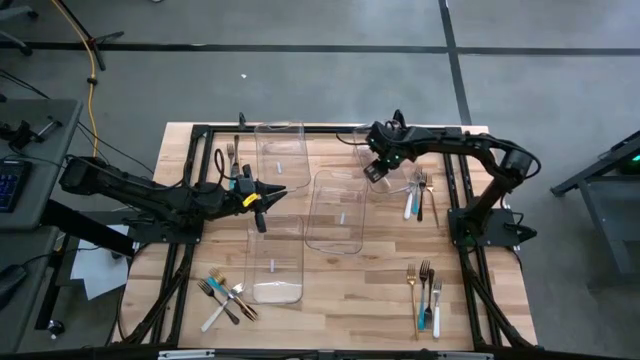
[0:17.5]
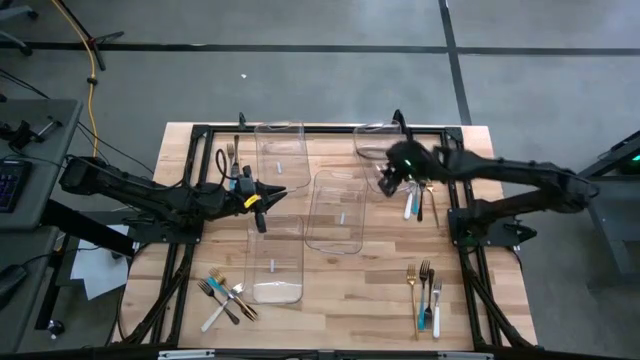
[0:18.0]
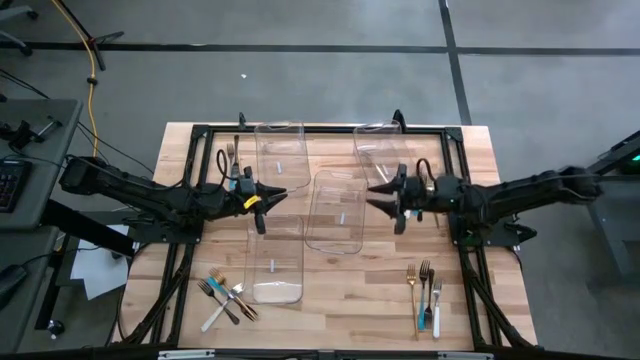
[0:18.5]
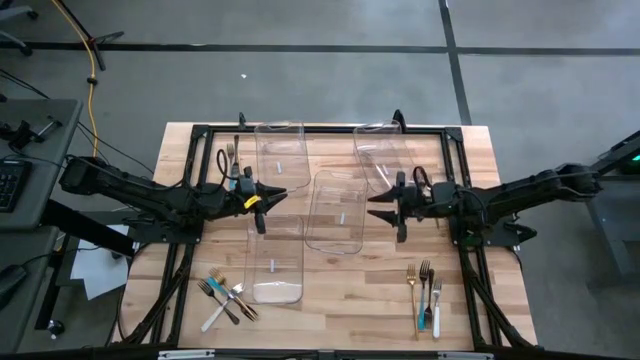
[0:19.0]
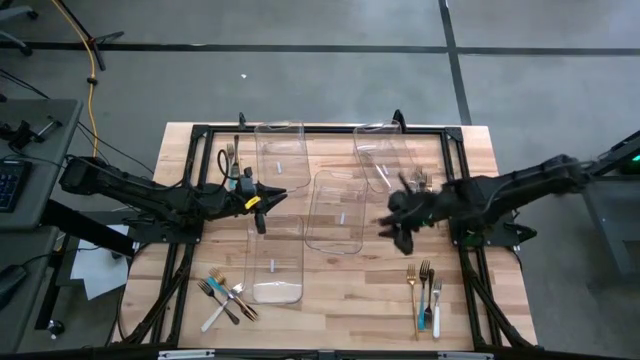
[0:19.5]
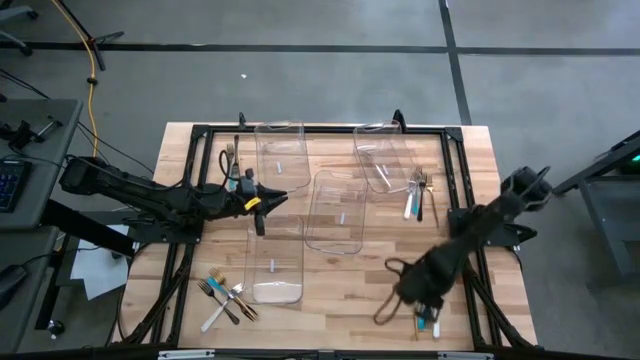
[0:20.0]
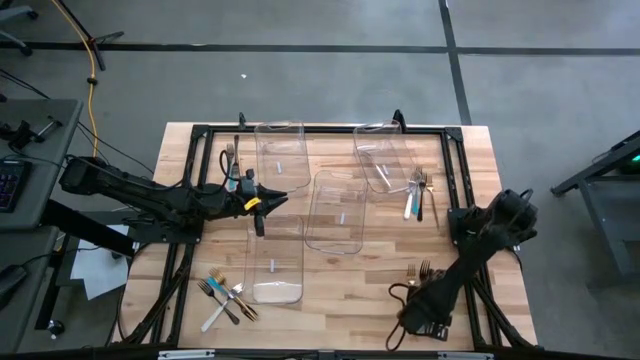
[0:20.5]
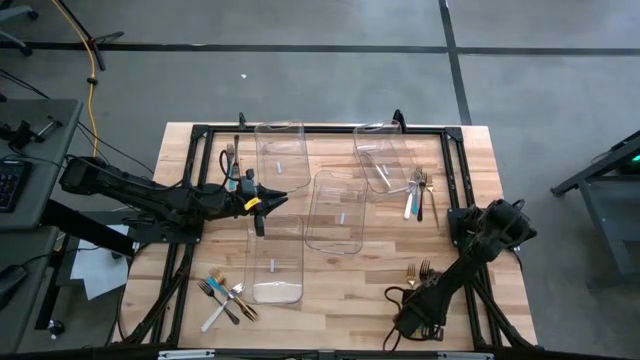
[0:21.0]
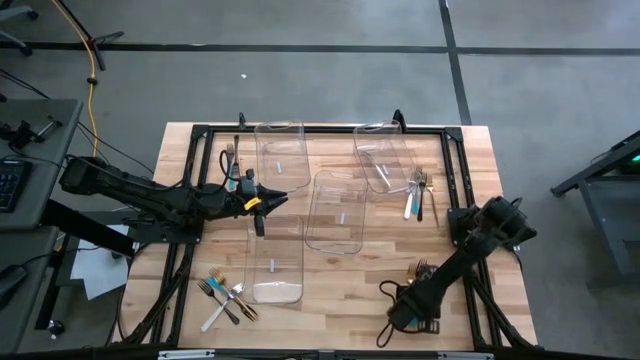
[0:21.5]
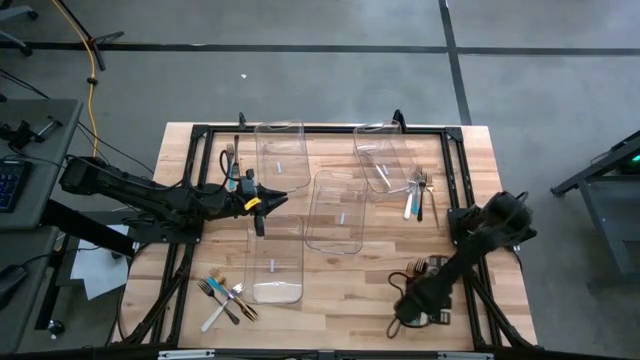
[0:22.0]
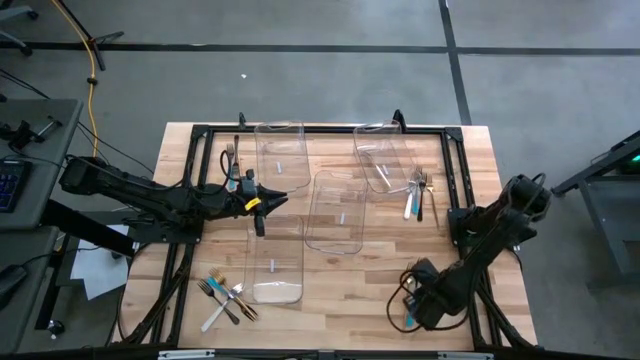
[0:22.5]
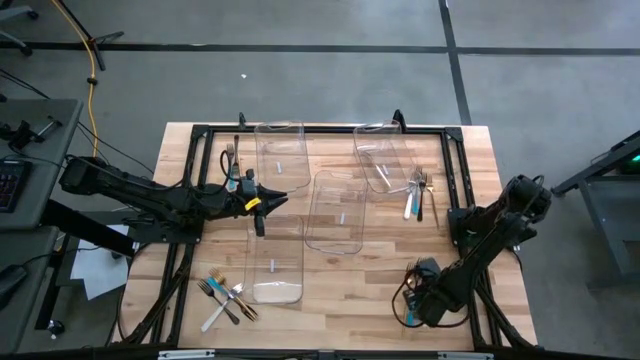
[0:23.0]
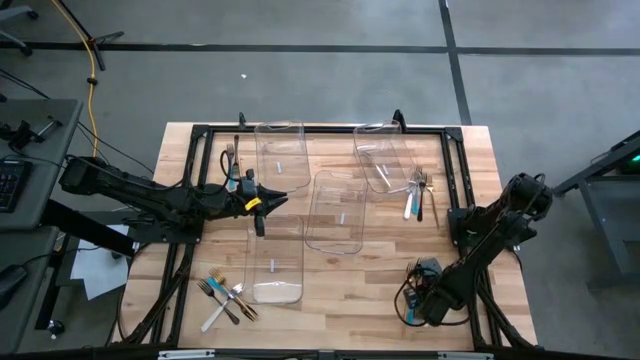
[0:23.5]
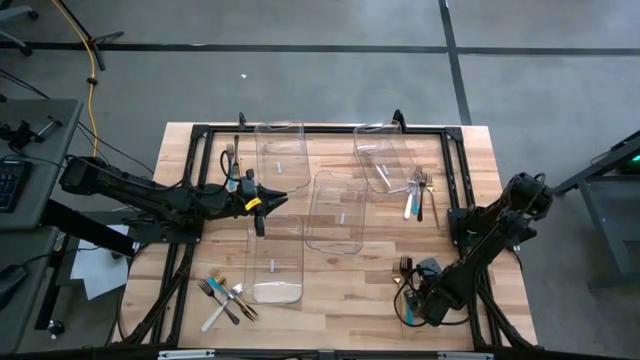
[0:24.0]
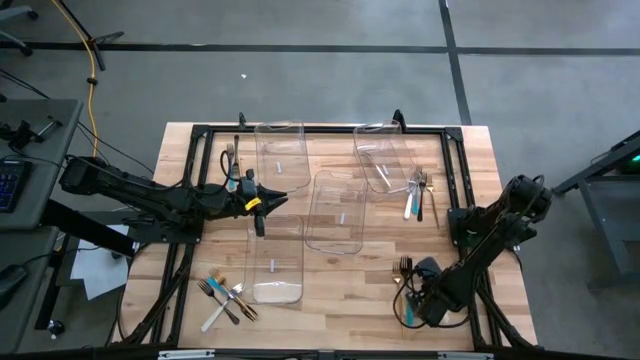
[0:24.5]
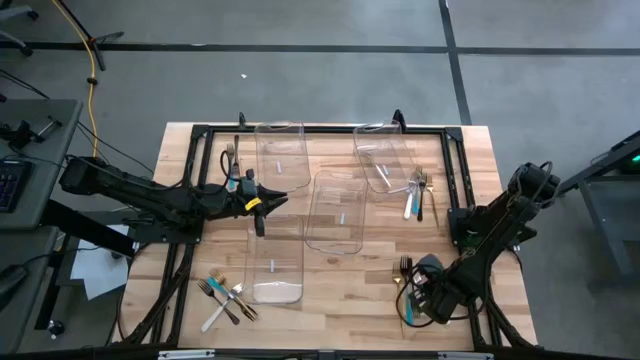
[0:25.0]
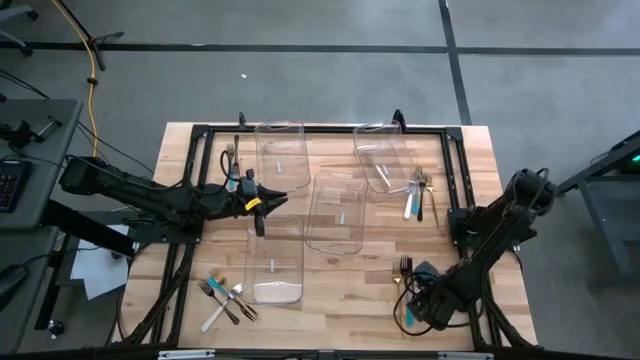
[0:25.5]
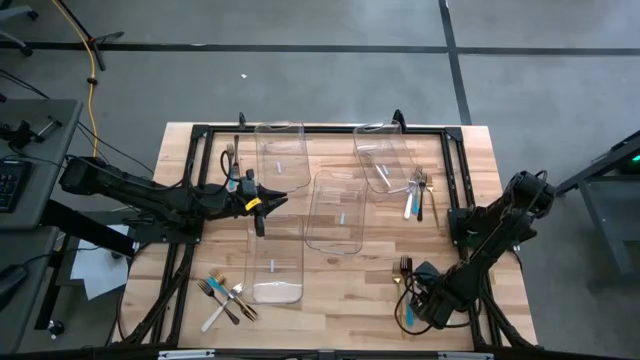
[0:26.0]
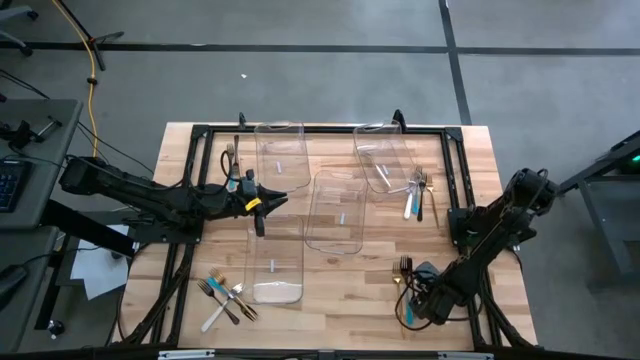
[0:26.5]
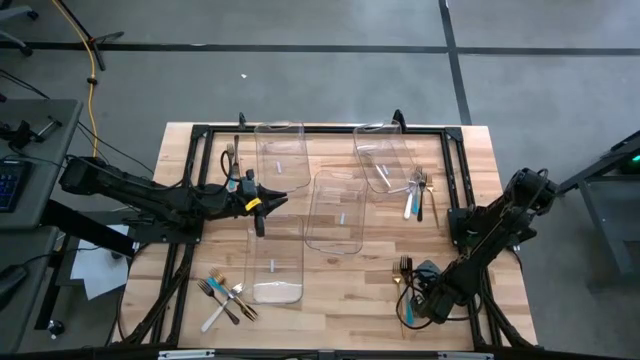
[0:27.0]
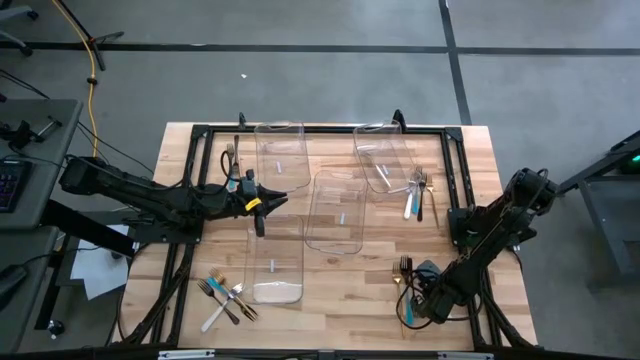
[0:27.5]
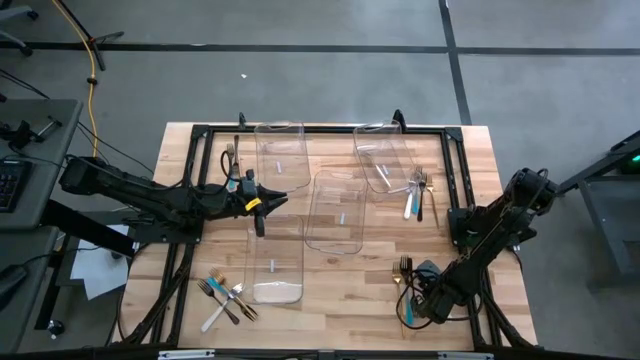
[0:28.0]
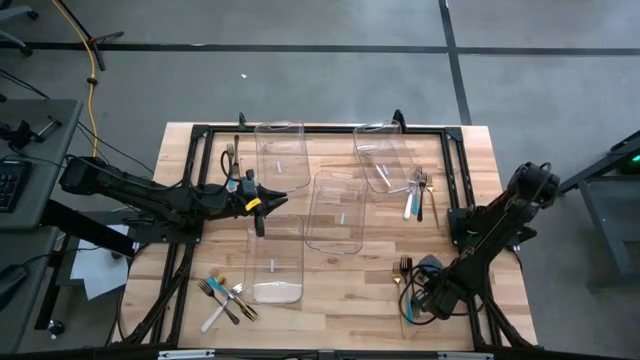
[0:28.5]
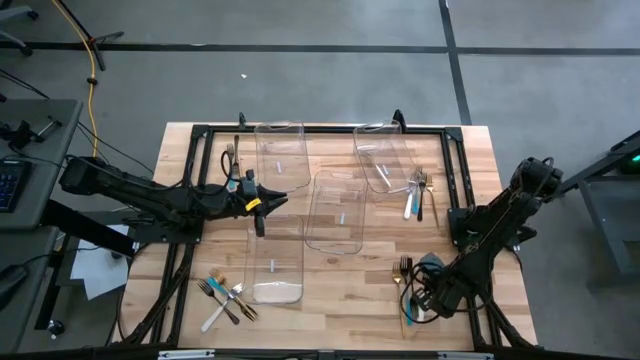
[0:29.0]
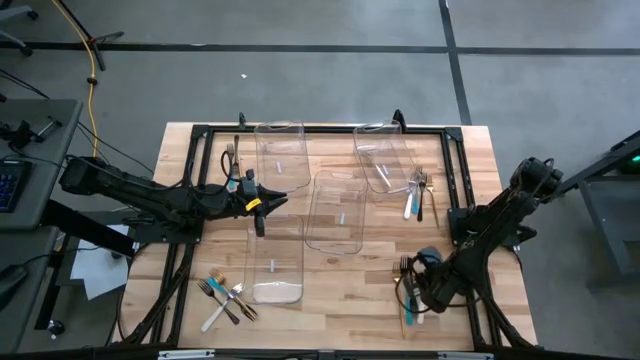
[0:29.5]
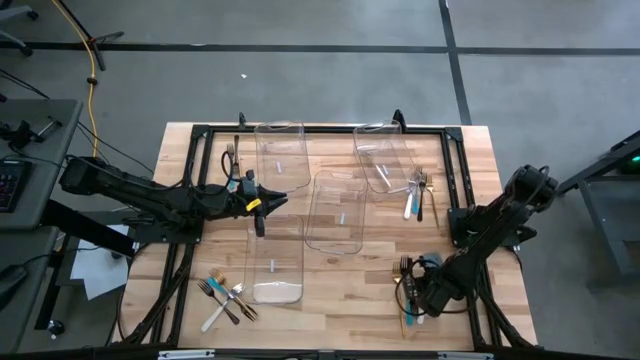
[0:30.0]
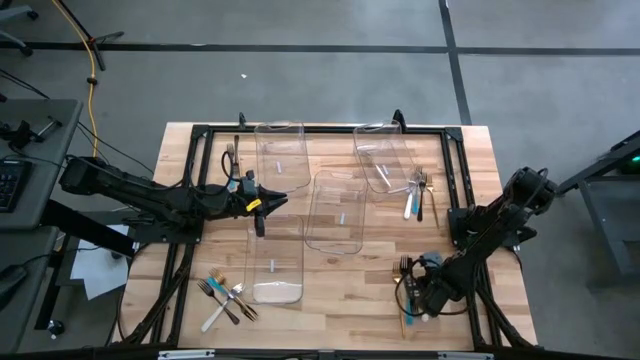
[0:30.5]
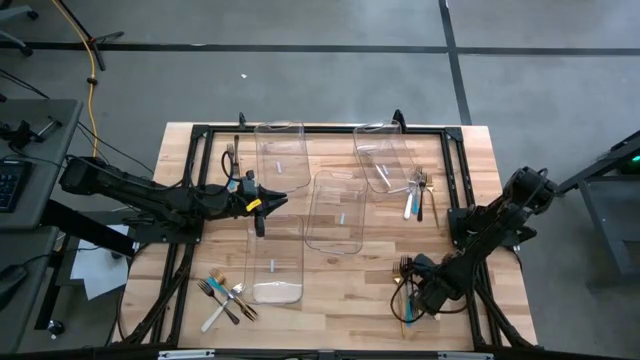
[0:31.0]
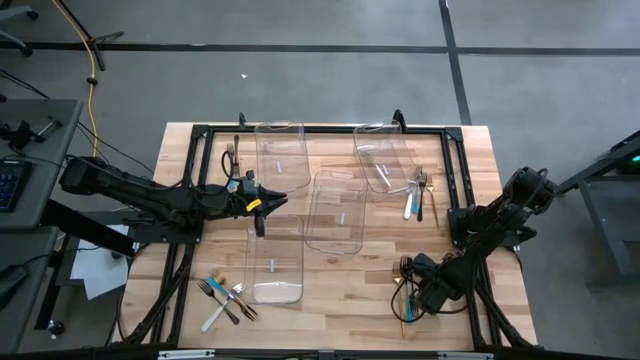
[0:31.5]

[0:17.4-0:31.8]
Task: Sort silverware by color (type)
Put the white fork into the top right transparent bin

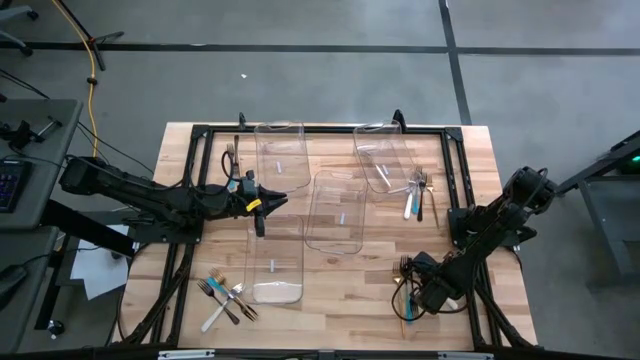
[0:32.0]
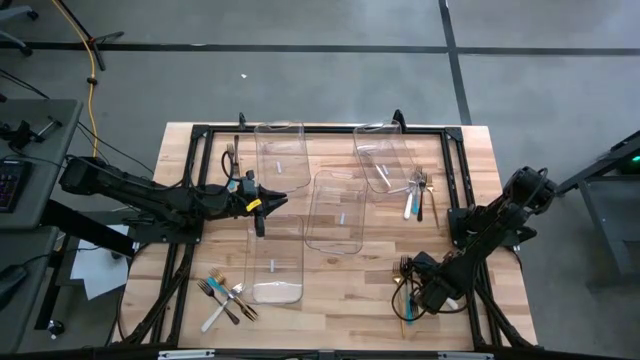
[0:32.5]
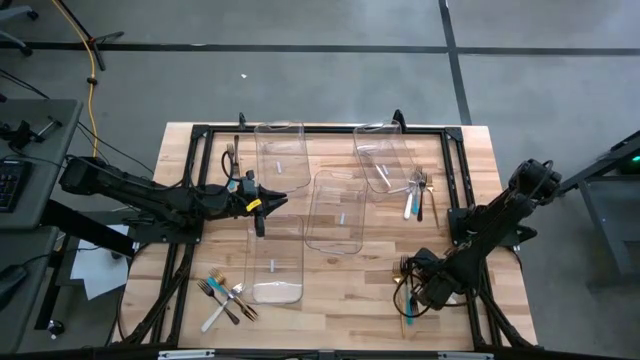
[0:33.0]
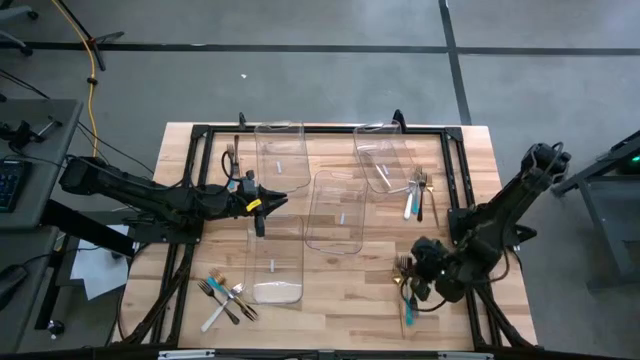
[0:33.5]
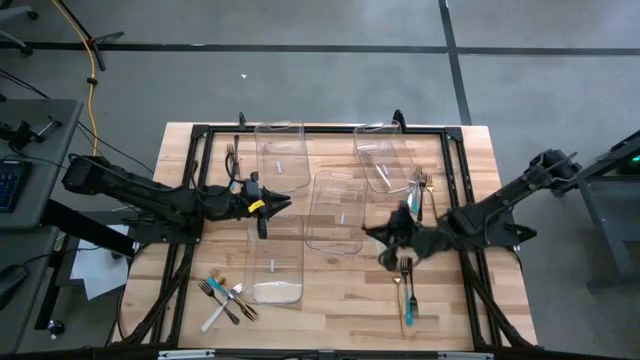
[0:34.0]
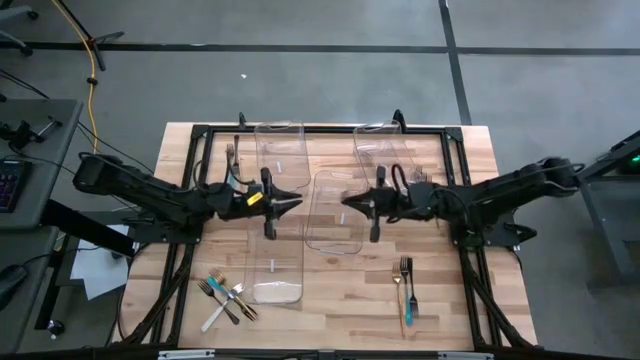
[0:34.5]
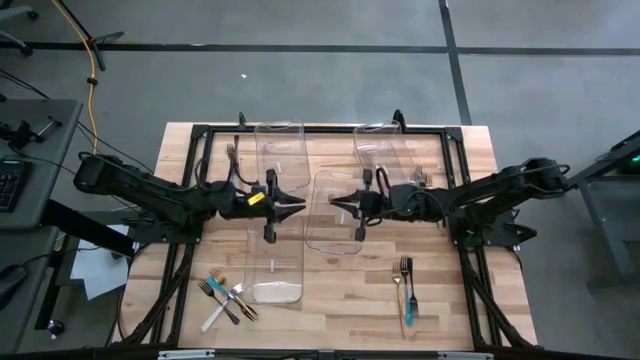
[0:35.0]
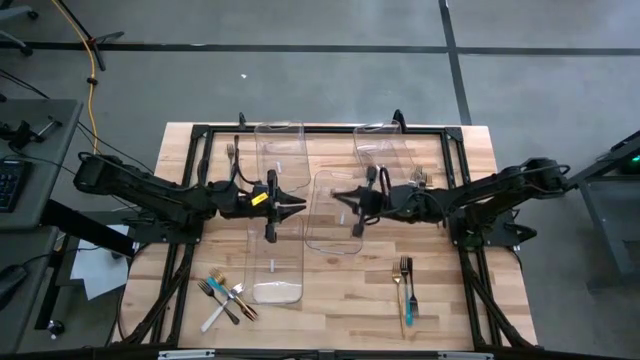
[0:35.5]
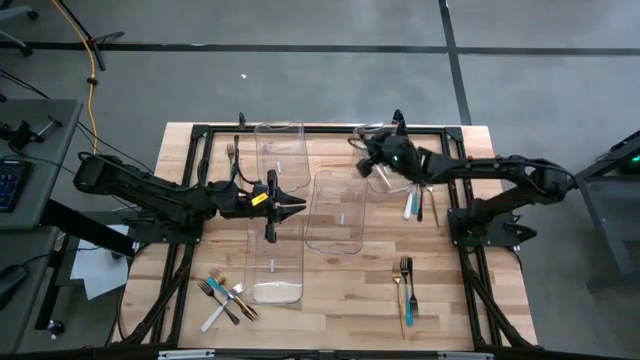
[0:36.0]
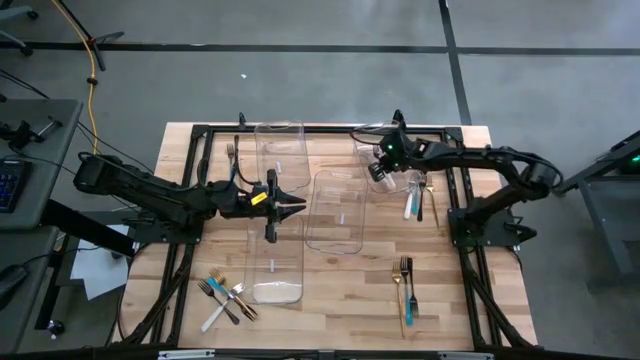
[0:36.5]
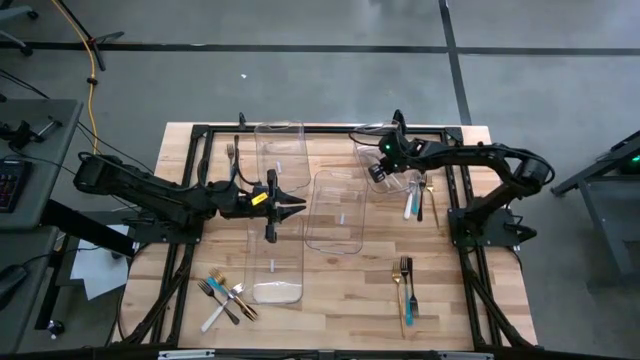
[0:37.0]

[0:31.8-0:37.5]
Put the white fork into the top right transparent bin
